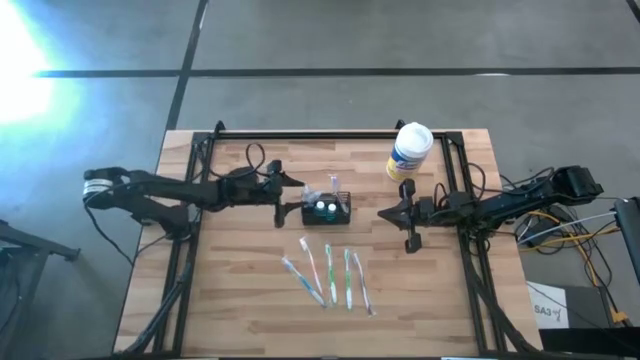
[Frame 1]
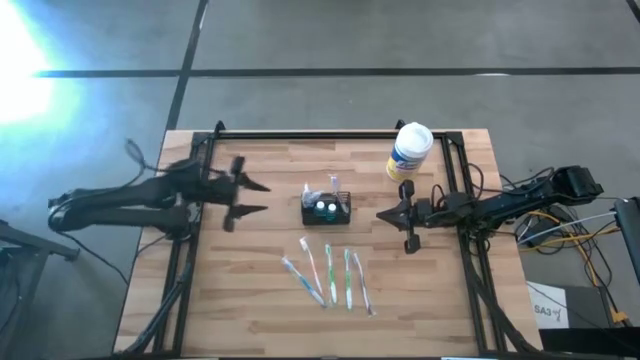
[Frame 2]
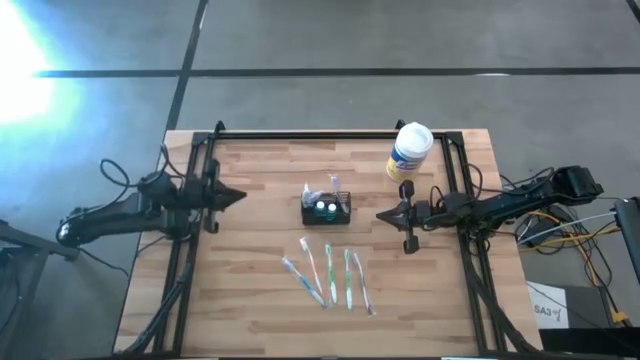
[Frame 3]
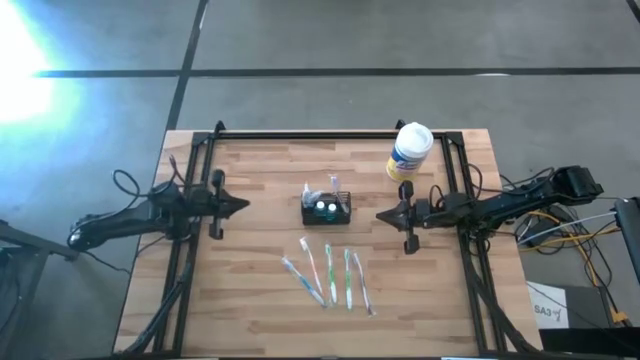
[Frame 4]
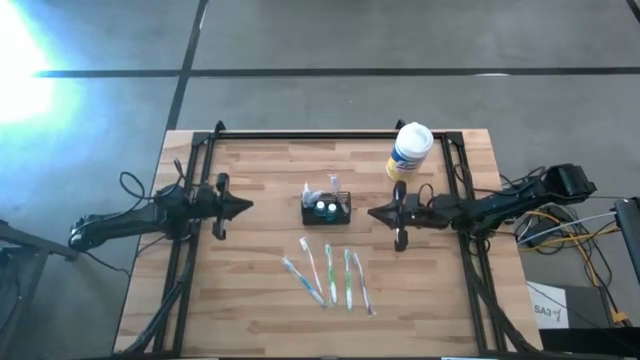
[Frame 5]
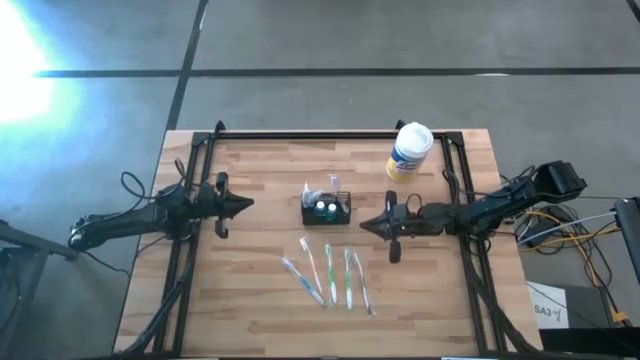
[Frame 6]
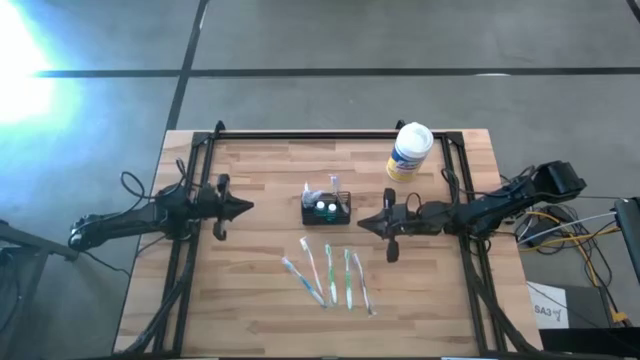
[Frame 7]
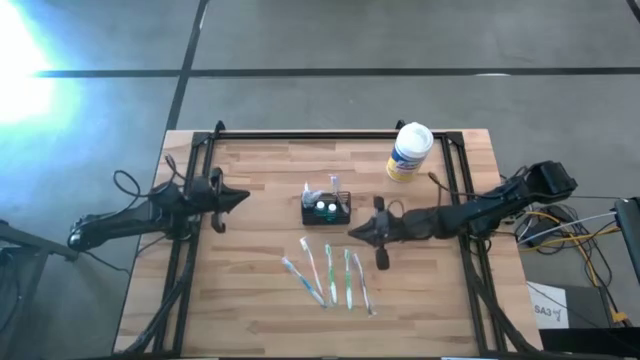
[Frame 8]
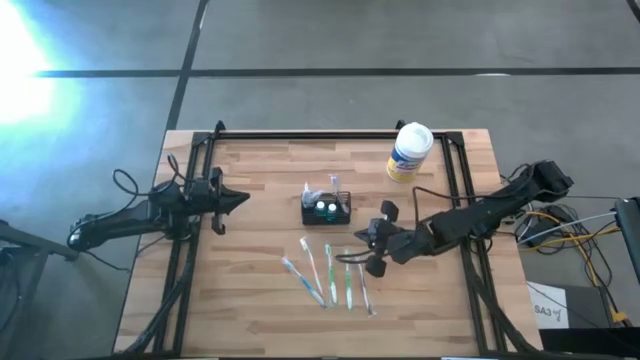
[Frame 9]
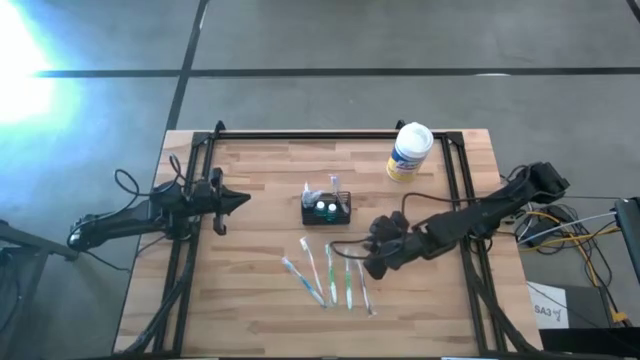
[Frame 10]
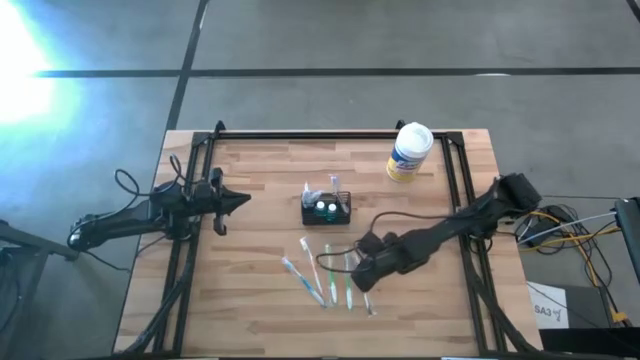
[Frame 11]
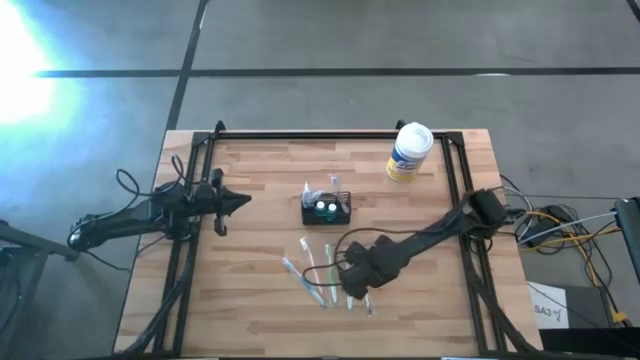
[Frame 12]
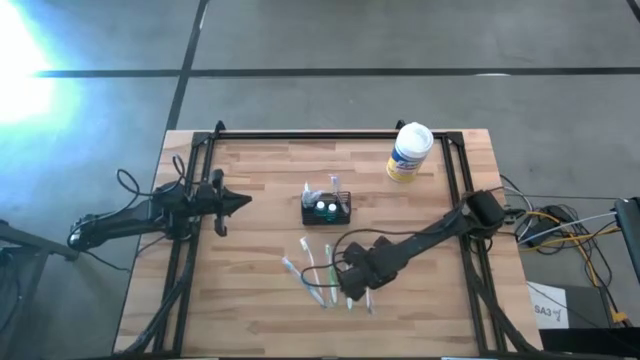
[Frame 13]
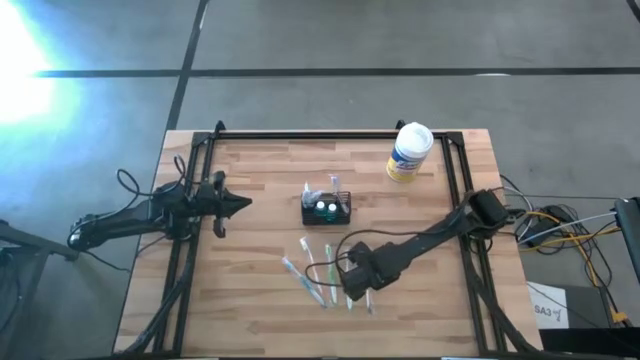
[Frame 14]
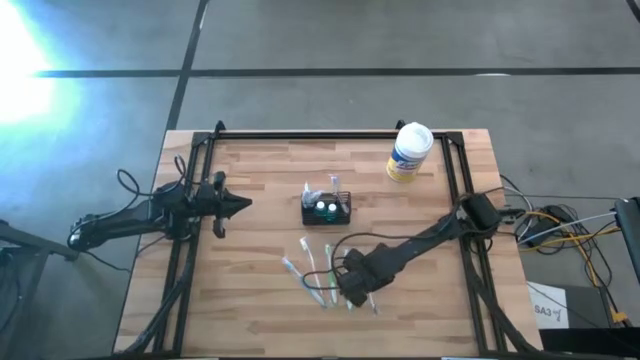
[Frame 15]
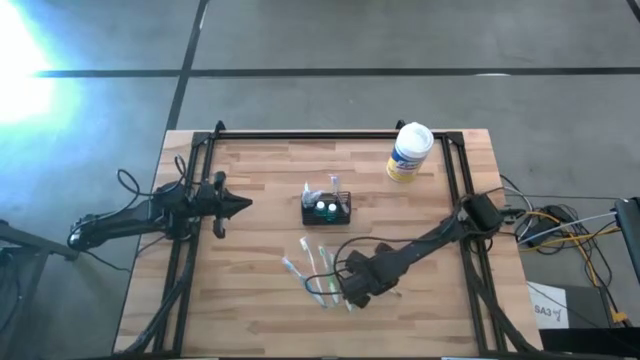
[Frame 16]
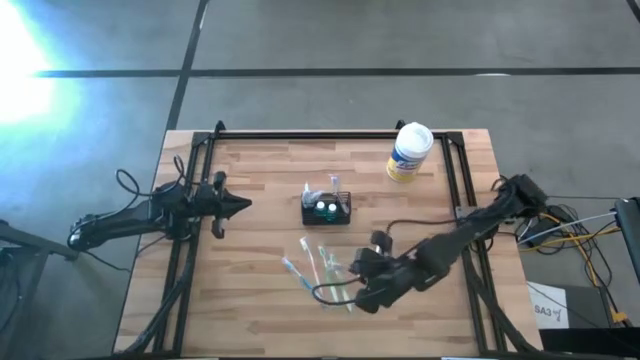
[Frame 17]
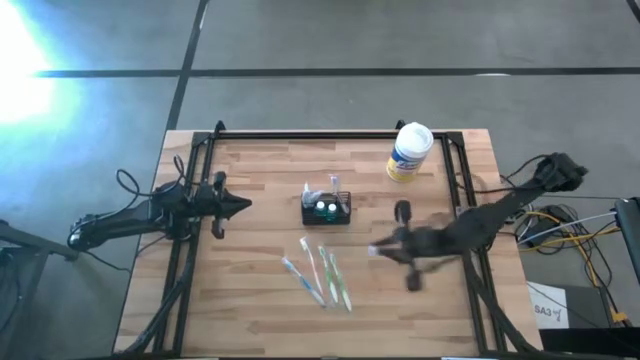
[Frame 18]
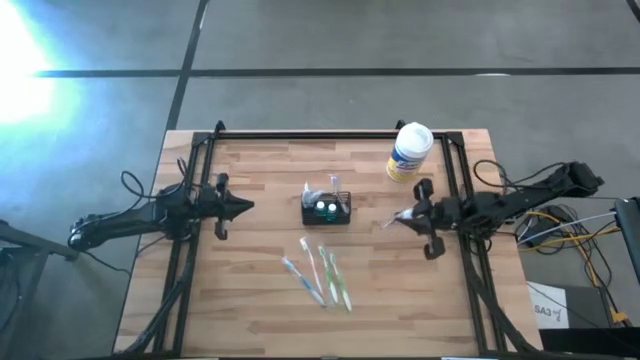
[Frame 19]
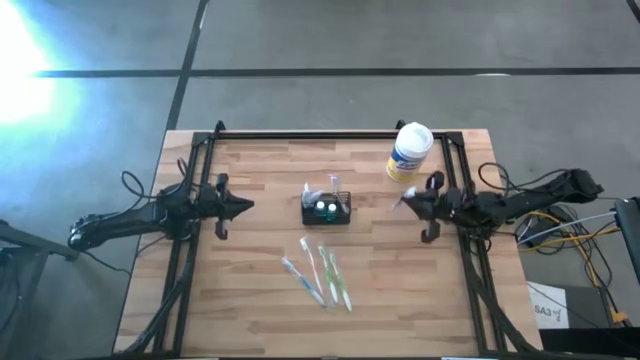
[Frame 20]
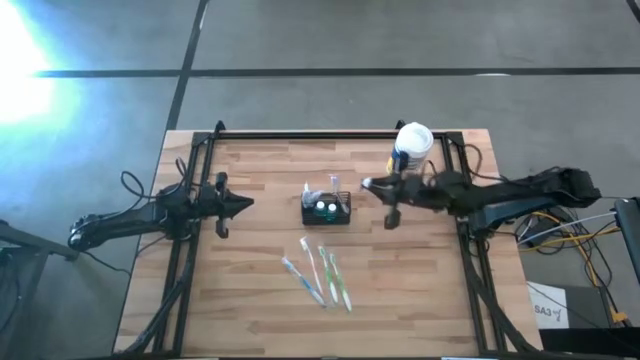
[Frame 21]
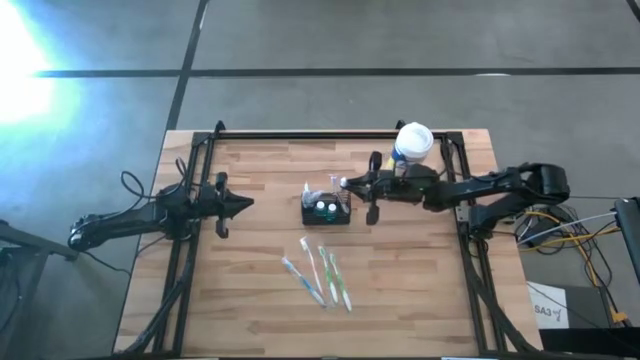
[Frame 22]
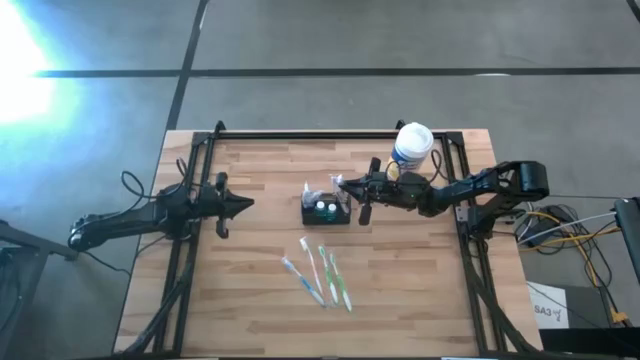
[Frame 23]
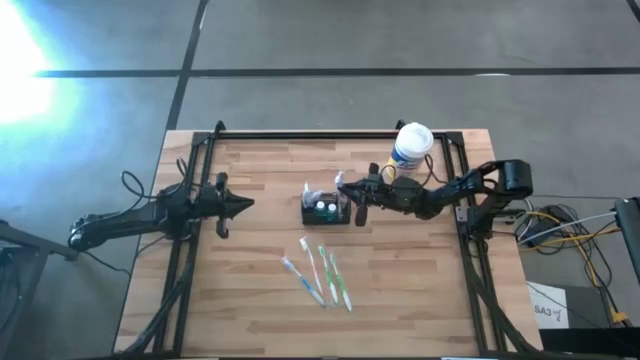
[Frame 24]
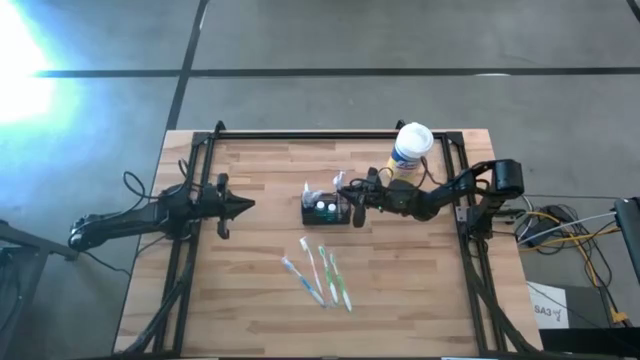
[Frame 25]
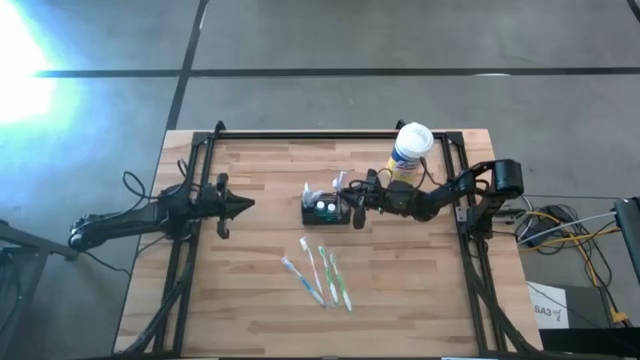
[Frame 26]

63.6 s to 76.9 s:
Task: Pick & Place toothbrushing station
Put the purple toothbrush into the black wire organizer

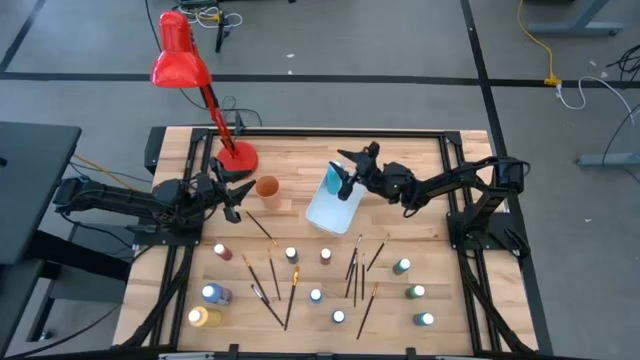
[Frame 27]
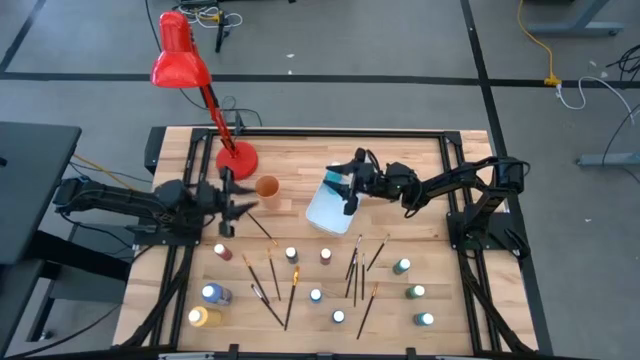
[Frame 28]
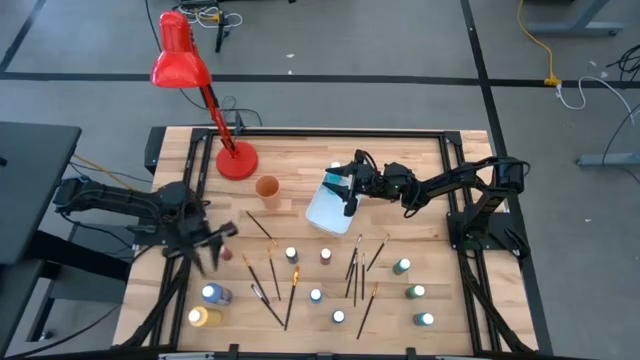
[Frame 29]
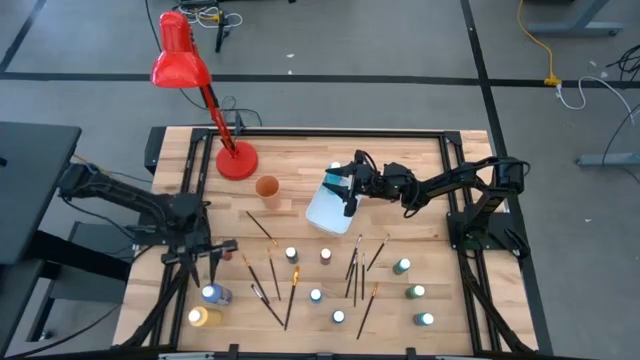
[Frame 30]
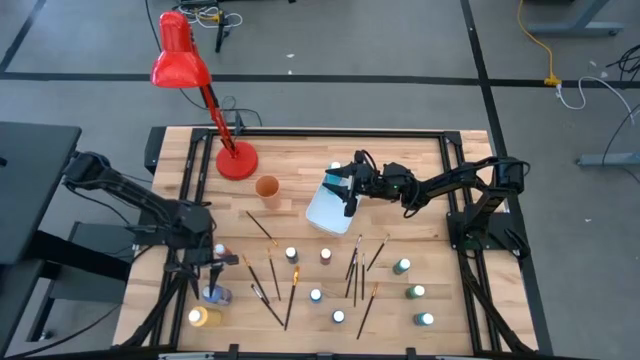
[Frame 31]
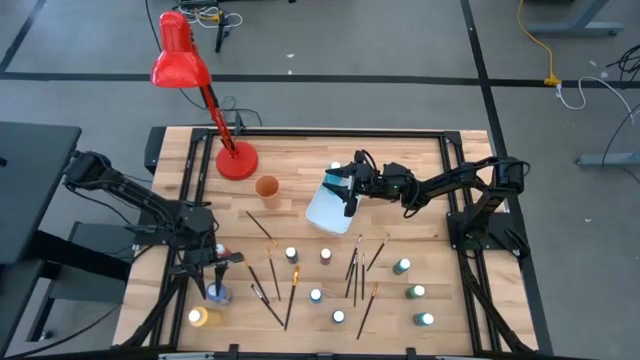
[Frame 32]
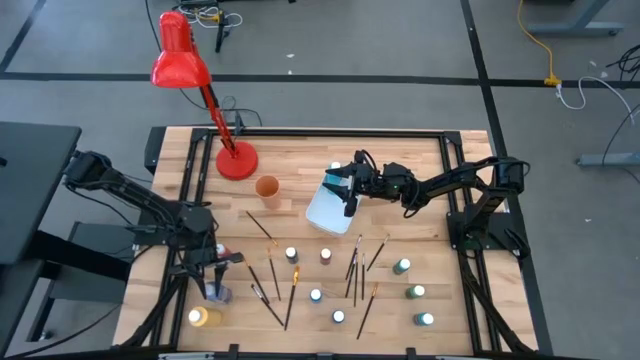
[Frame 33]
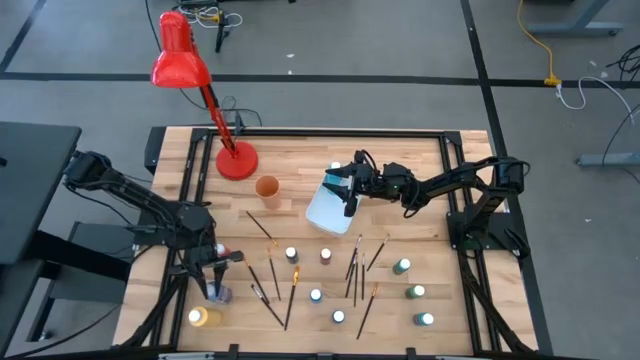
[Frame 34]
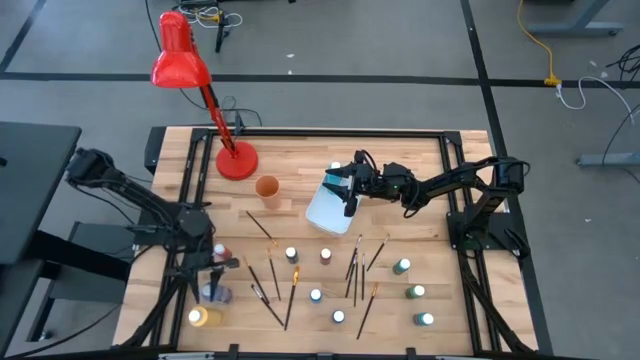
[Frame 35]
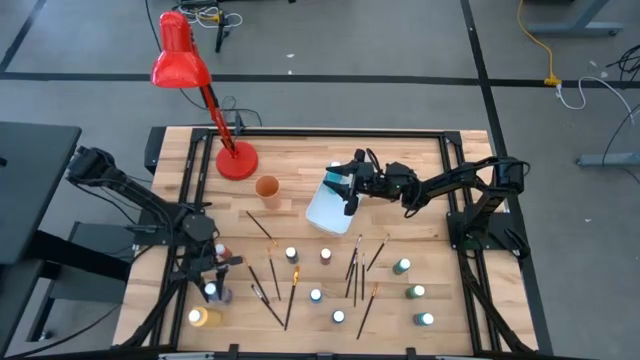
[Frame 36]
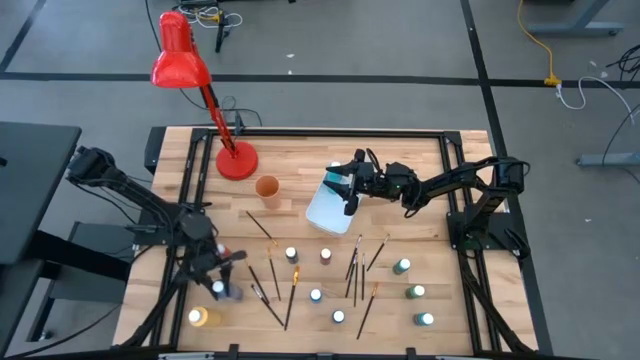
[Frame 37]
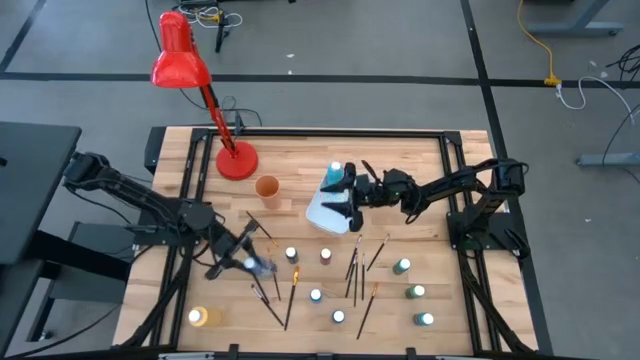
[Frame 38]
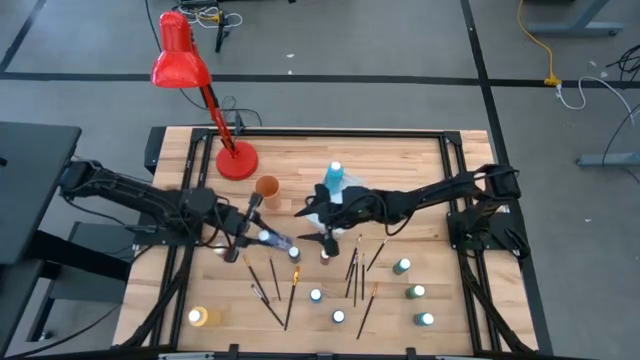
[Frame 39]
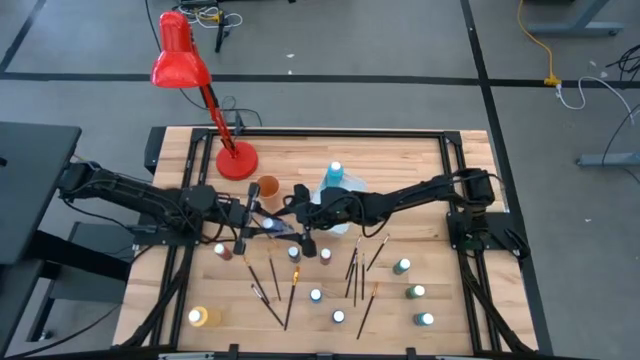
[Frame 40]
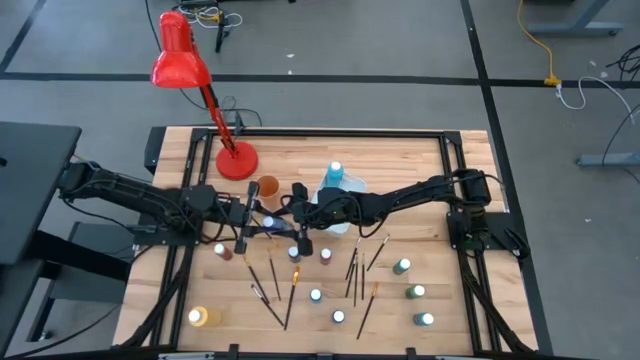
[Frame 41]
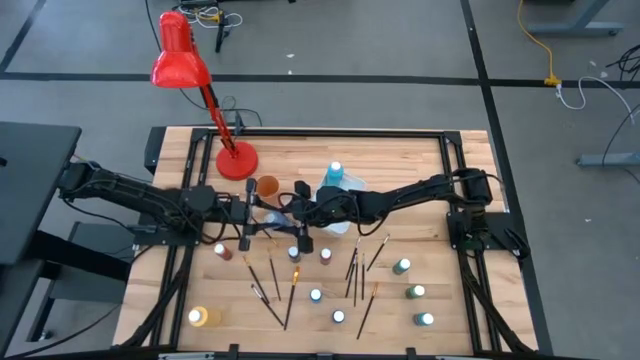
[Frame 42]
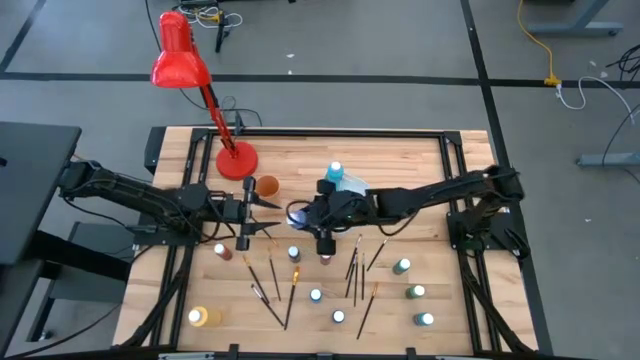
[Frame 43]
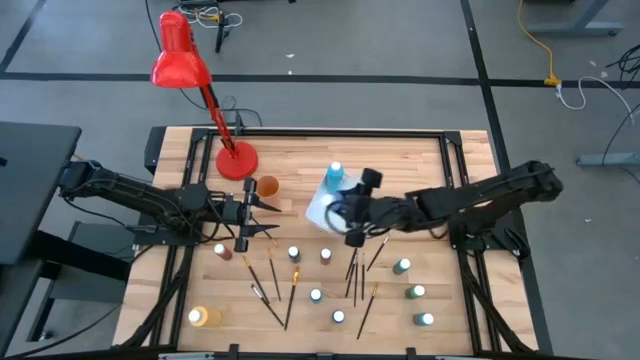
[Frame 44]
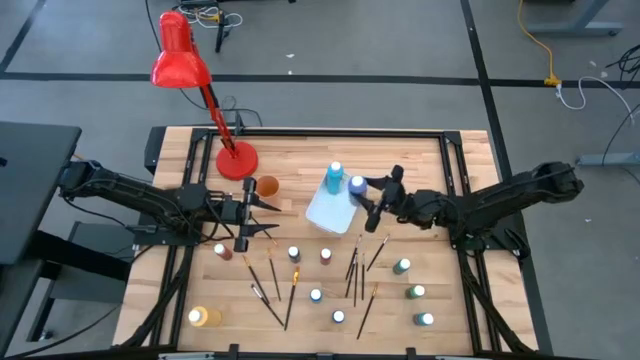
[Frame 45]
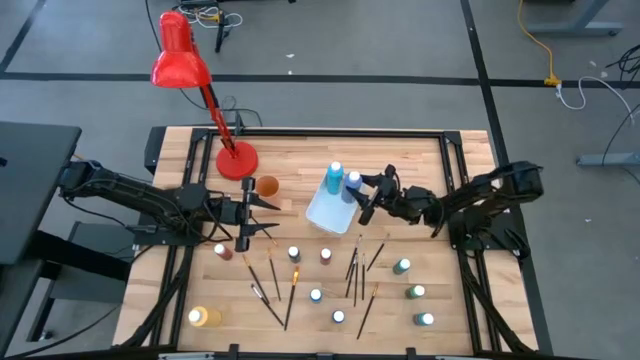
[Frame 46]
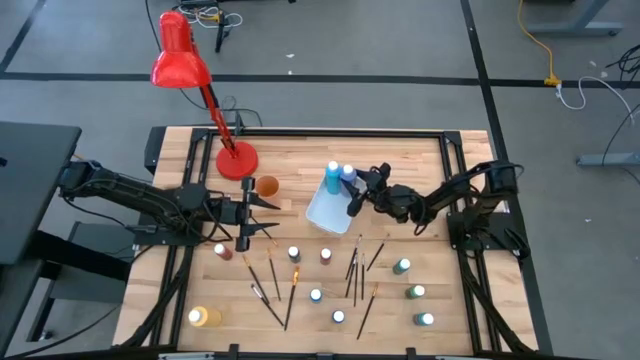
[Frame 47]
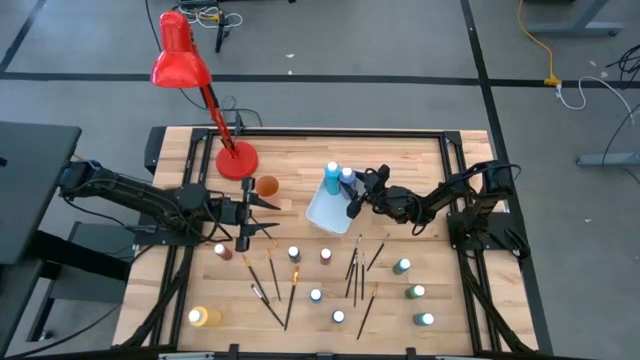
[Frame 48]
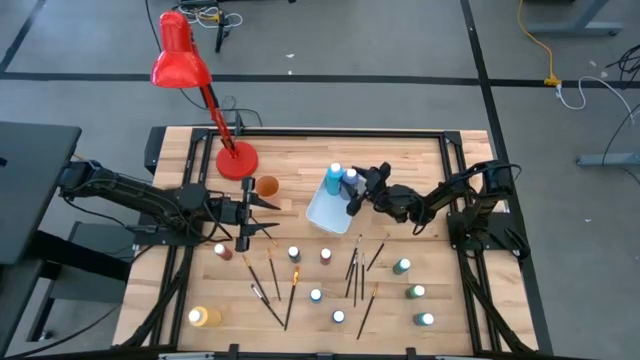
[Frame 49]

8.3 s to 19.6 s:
Task: Pick & Place Paint Supplies
Put the large purple paint bottle into the white bin
